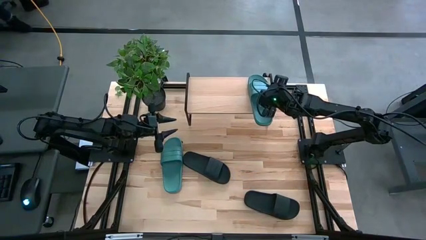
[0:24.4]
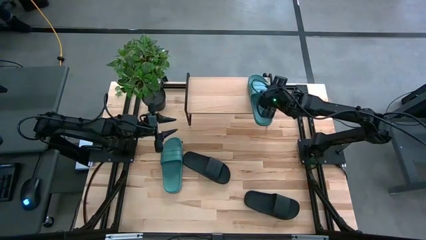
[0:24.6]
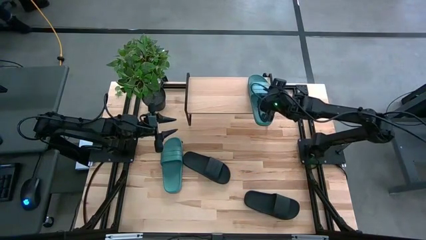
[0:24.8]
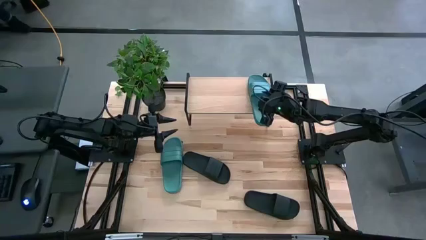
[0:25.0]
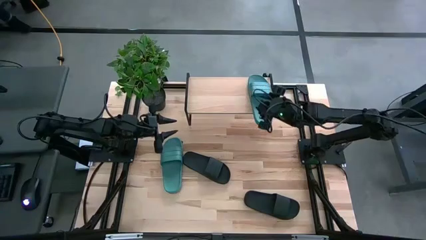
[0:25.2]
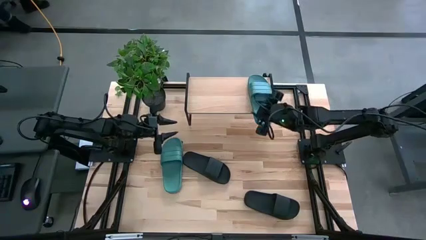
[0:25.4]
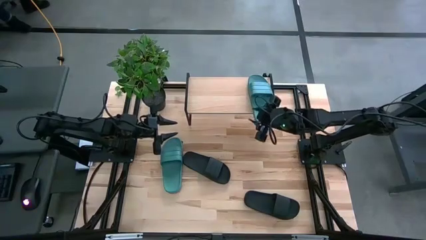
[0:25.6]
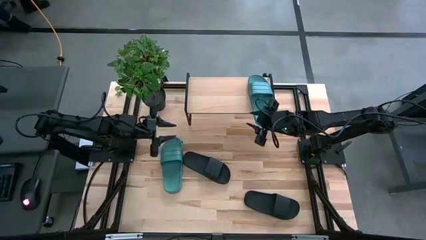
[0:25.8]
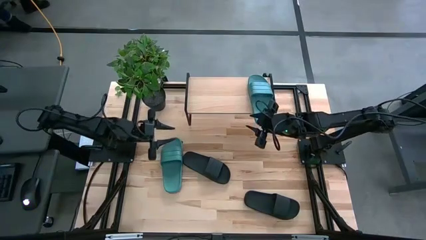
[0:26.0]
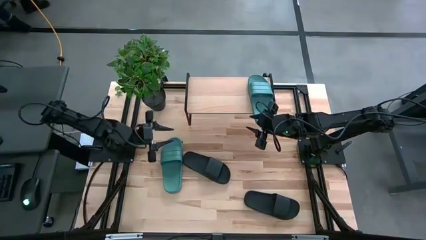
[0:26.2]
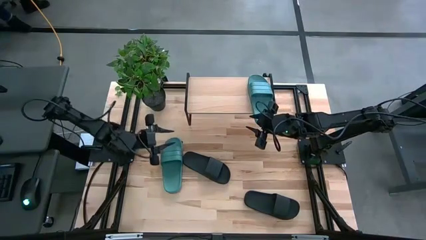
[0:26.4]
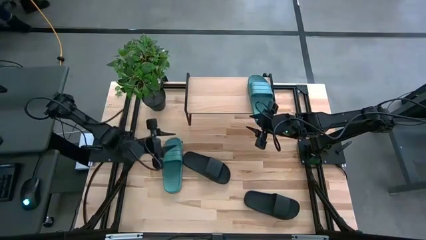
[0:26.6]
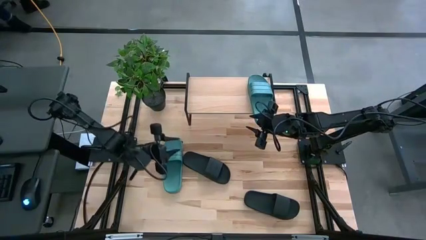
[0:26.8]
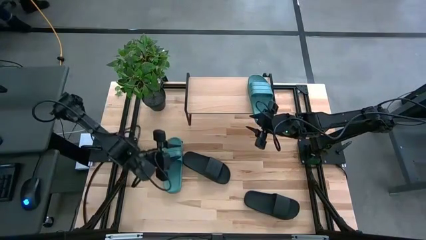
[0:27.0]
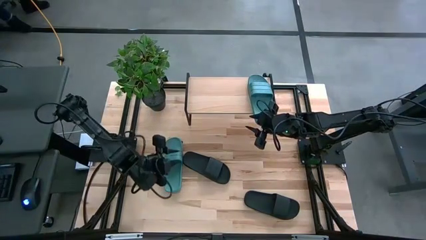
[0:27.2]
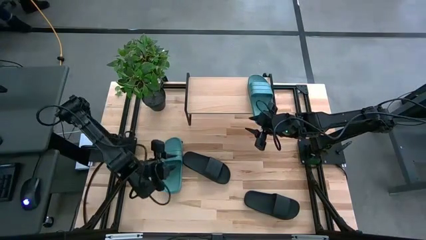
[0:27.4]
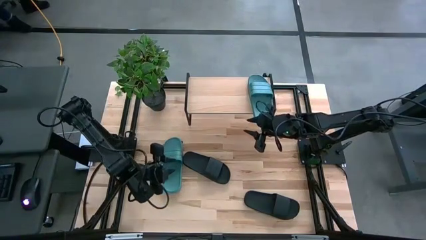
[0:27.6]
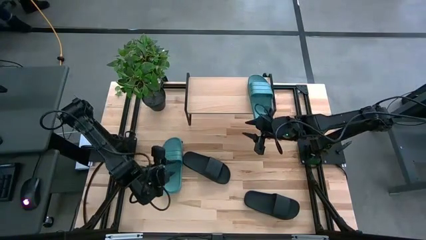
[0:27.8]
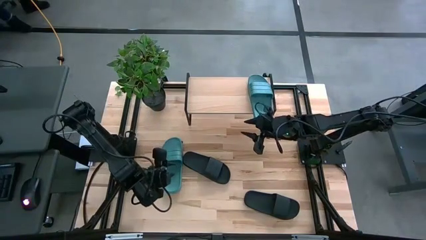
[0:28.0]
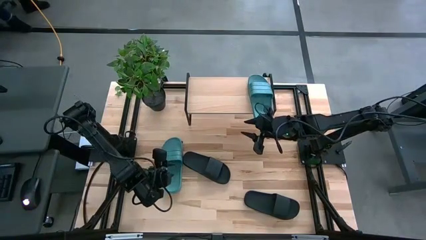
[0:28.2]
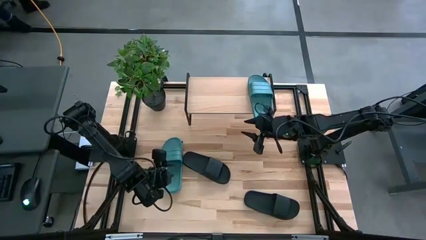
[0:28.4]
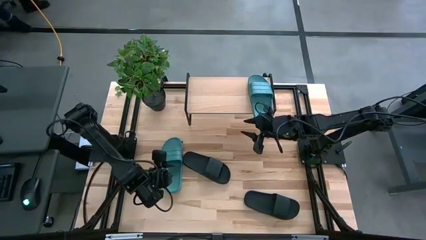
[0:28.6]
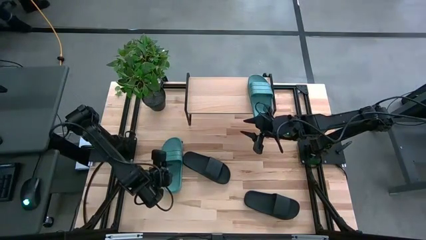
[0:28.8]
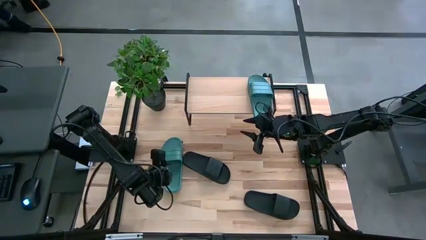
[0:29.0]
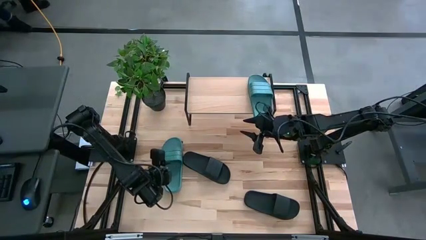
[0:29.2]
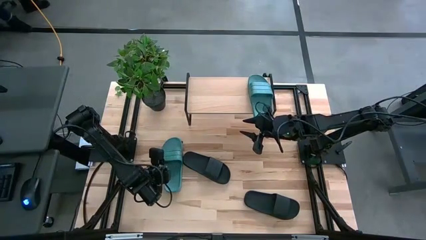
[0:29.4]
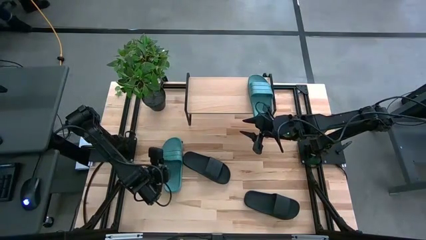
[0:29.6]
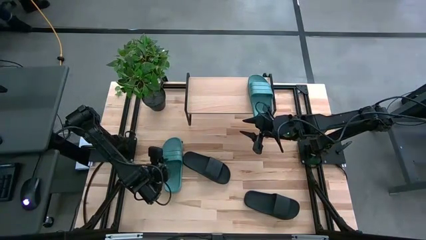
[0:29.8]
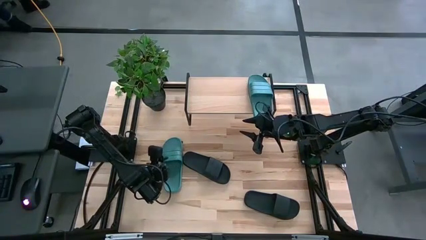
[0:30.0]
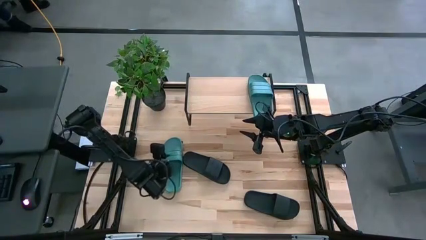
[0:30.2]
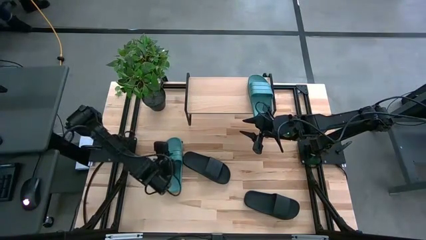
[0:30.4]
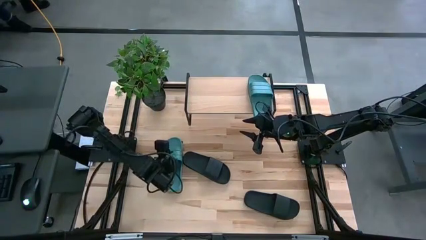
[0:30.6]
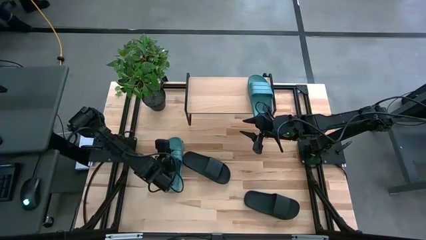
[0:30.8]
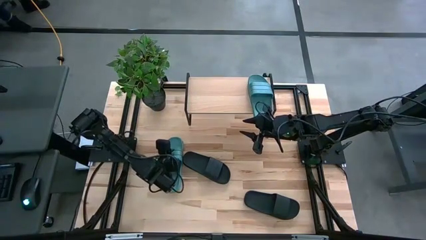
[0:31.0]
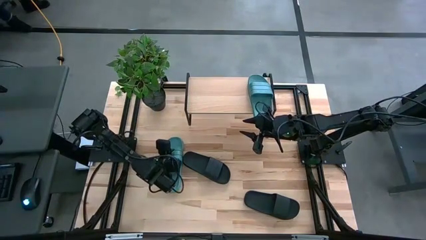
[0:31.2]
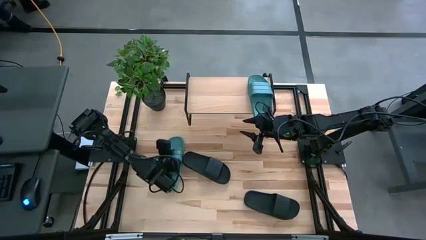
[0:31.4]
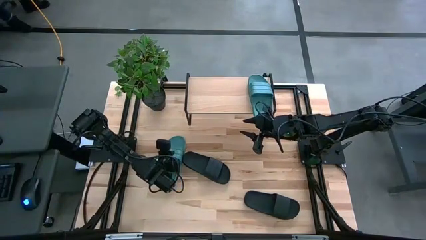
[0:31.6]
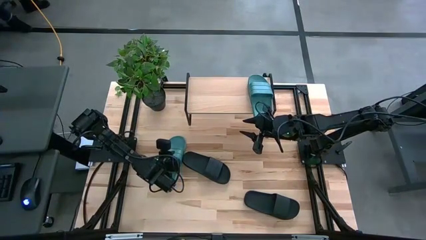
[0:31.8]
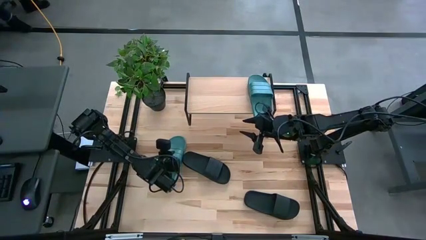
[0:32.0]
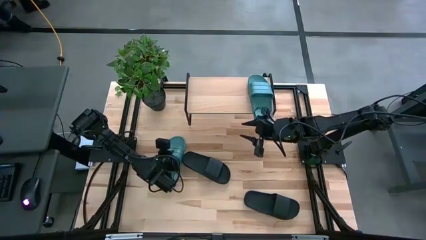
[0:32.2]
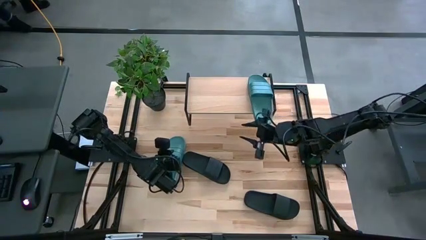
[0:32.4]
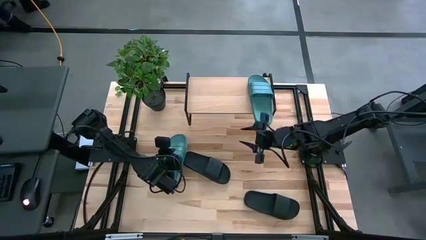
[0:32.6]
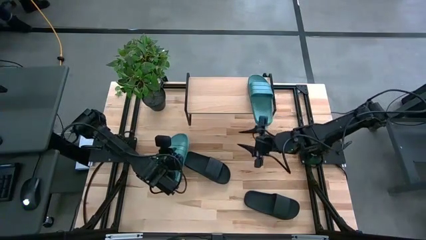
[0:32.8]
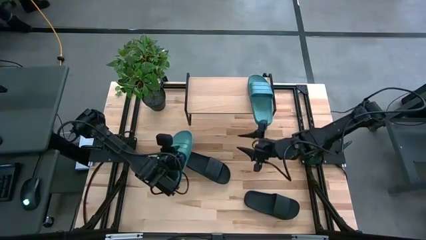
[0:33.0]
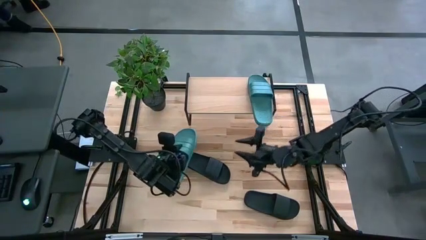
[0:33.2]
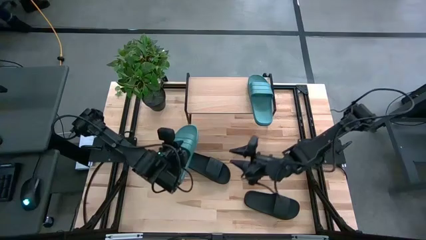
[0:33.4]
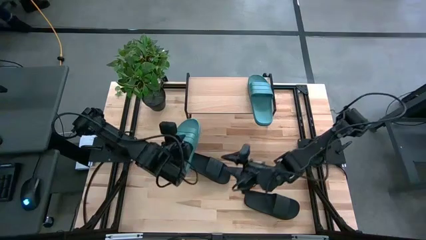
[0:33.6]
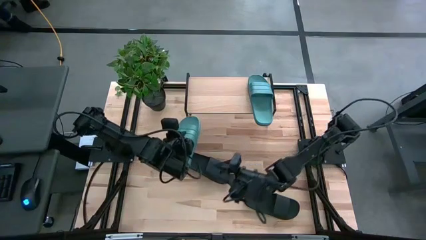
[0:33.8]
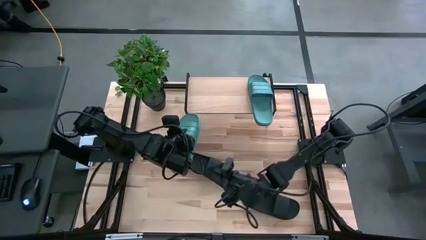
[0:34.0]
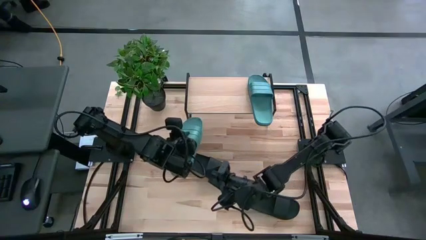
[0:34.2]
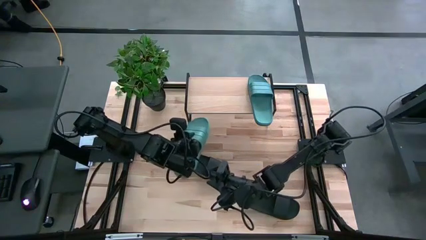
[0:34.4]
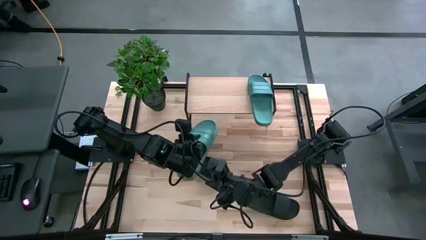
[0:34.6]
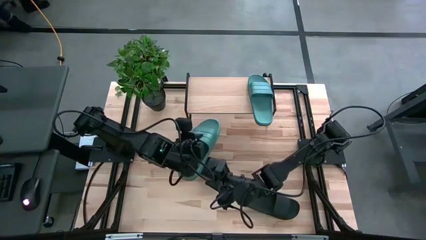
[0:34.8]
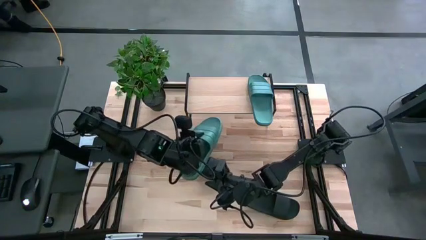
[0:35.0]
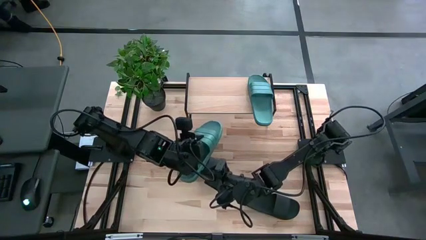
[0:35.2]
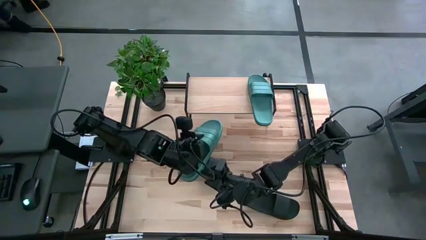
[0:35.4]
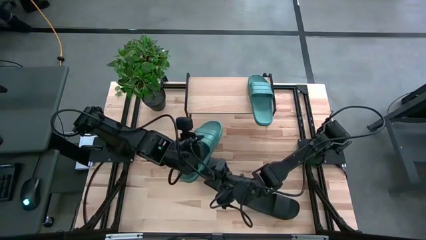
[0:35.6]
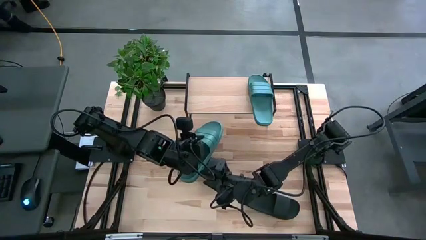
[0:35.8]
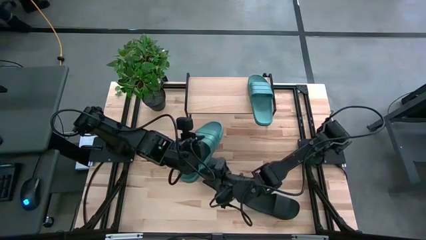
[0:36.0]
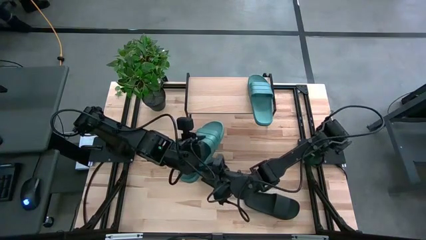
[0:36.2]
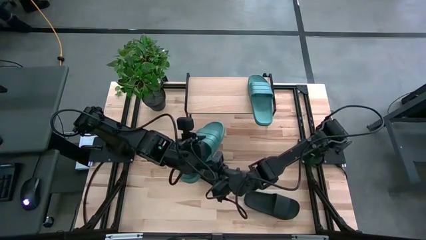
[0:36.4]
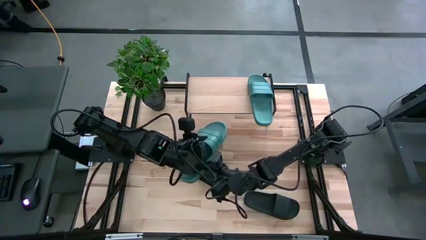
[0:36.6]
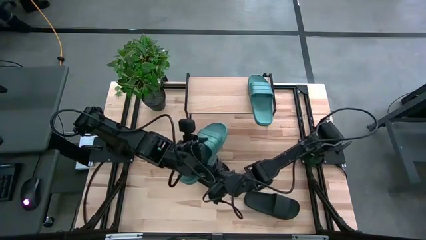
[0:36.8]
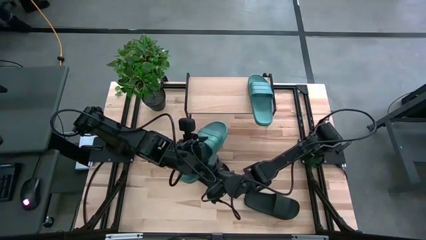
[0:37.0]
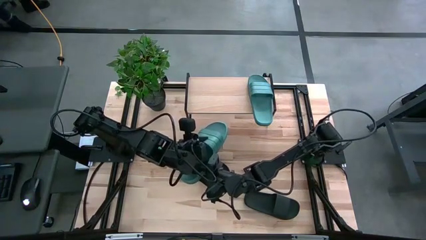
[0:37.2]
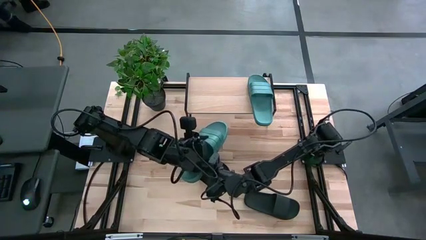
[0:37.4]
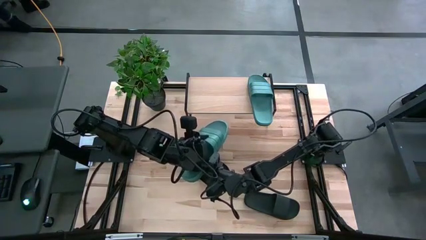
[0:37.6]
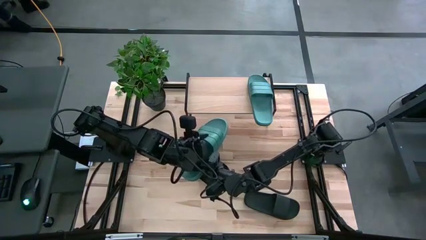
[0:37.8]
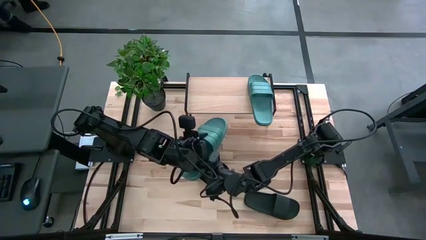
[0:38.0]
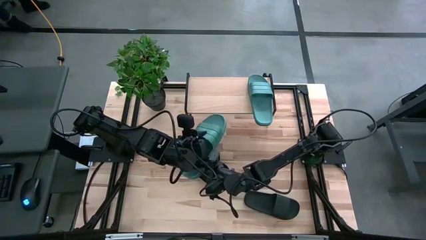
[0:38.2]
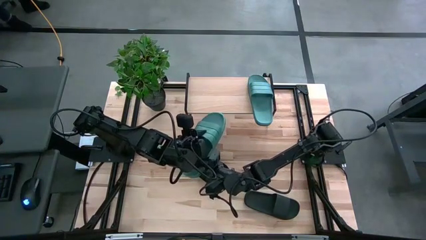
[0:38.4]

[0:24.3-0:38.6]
Task: Pick and place slides into the shelf
Put the green slide on the shelf
